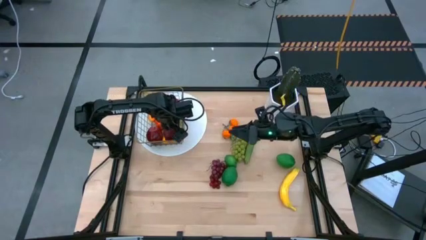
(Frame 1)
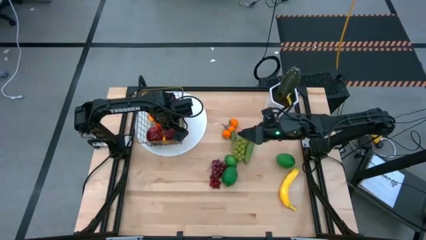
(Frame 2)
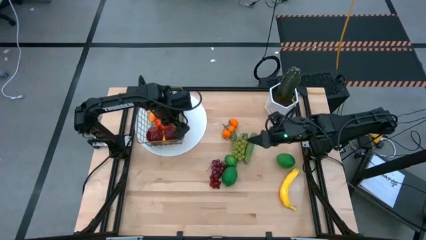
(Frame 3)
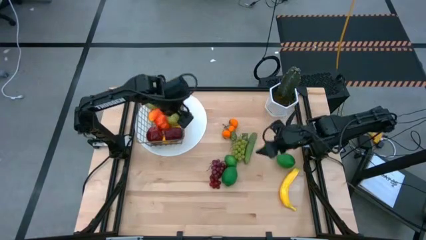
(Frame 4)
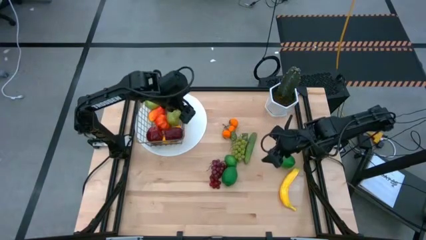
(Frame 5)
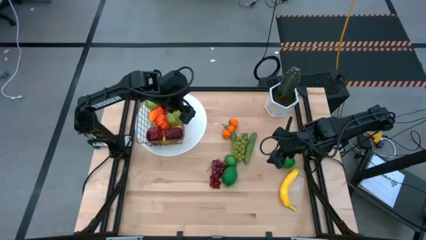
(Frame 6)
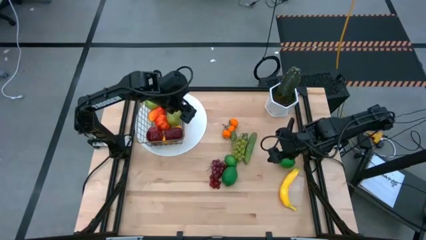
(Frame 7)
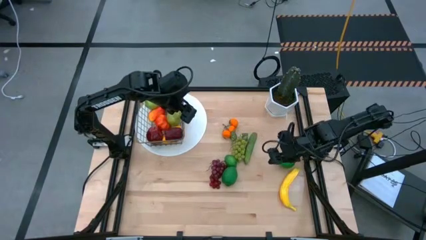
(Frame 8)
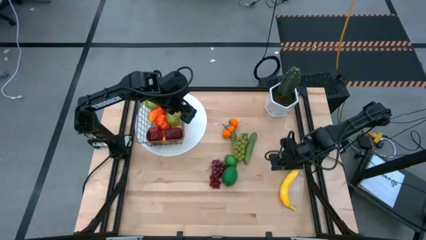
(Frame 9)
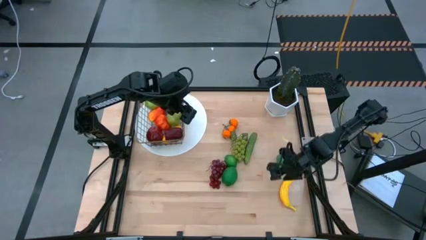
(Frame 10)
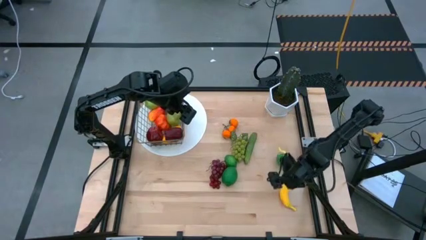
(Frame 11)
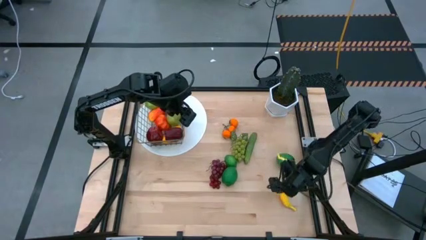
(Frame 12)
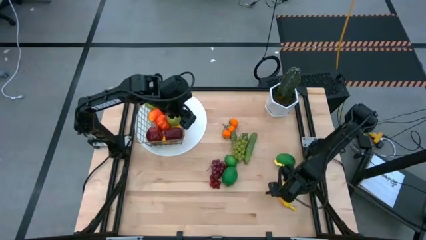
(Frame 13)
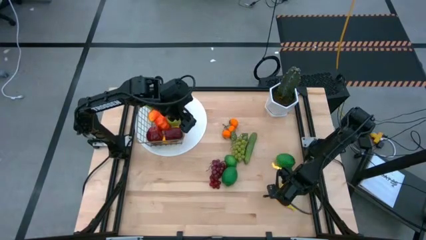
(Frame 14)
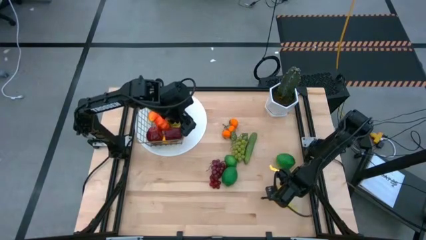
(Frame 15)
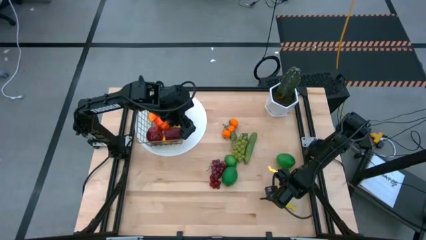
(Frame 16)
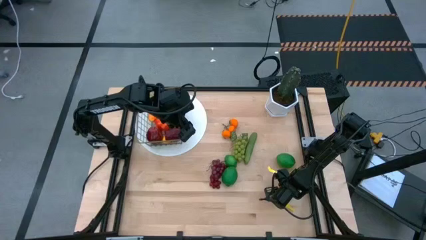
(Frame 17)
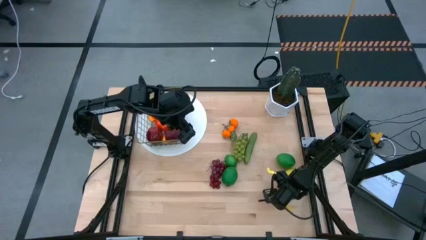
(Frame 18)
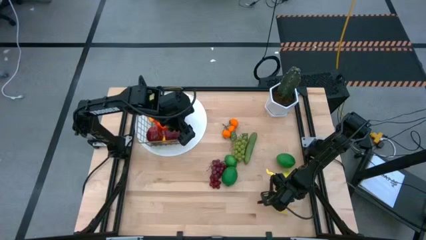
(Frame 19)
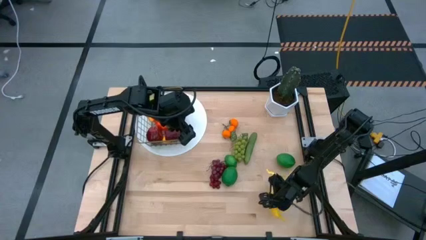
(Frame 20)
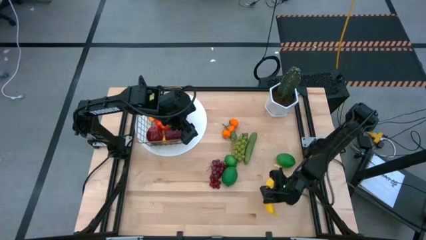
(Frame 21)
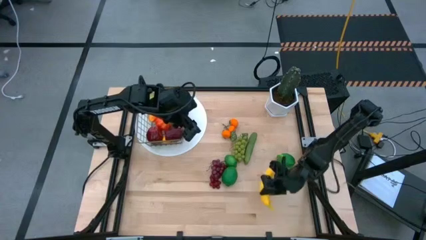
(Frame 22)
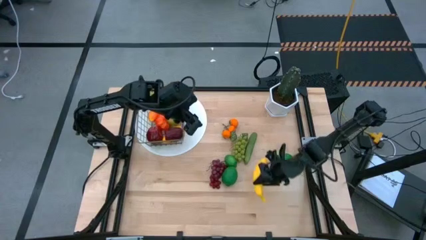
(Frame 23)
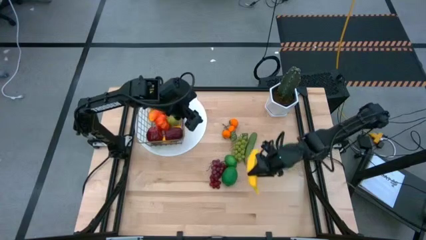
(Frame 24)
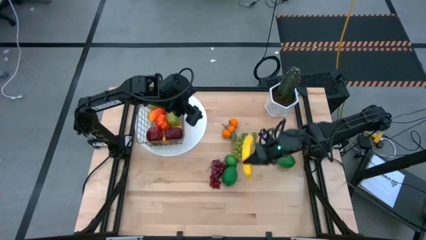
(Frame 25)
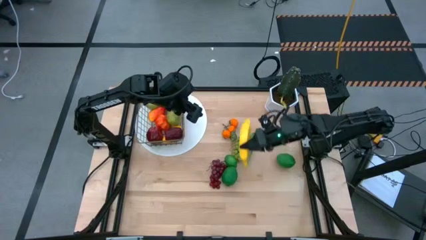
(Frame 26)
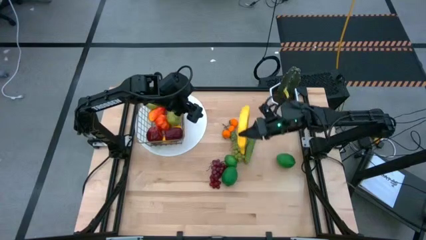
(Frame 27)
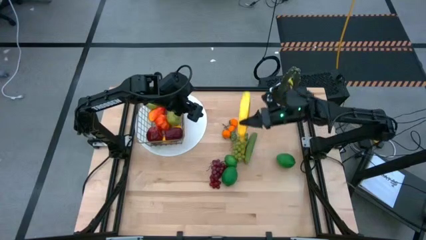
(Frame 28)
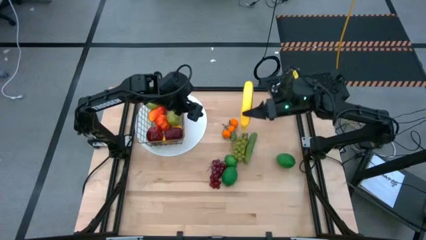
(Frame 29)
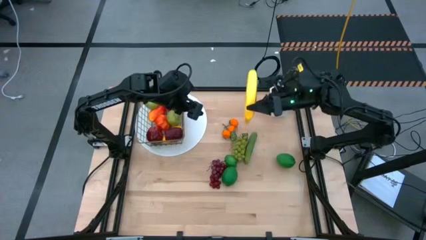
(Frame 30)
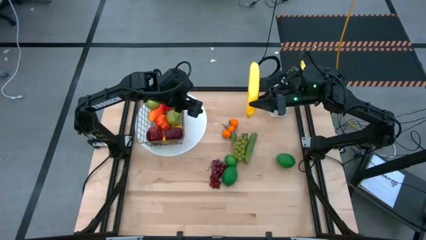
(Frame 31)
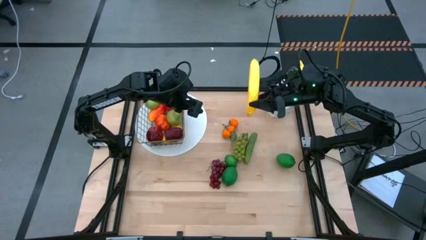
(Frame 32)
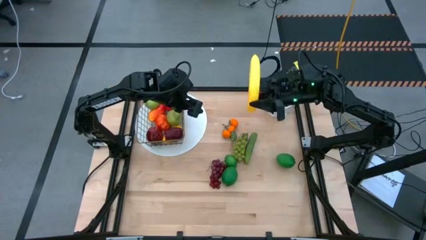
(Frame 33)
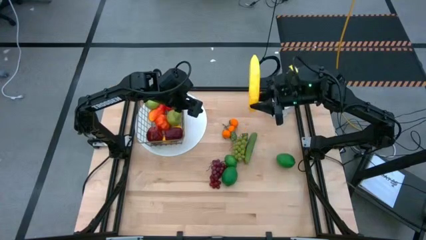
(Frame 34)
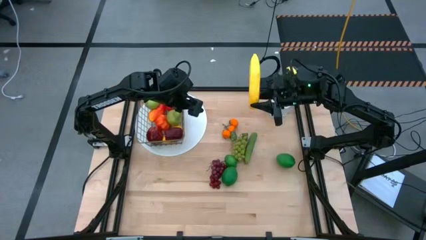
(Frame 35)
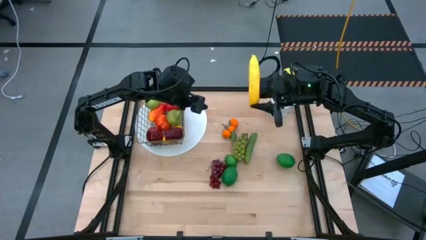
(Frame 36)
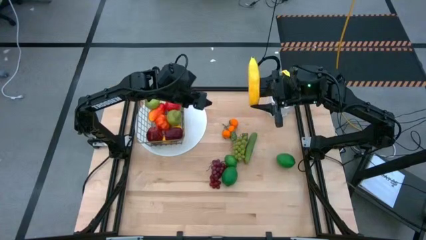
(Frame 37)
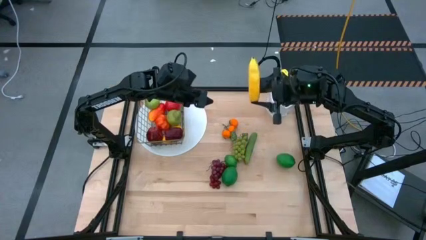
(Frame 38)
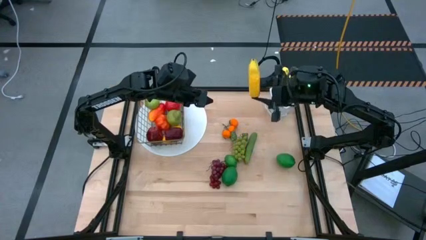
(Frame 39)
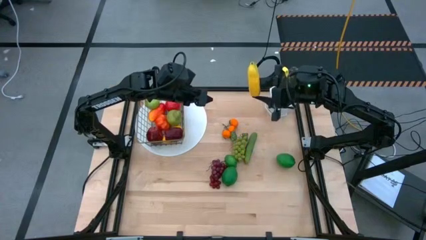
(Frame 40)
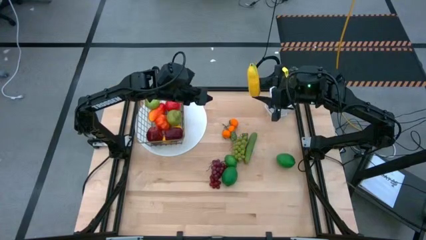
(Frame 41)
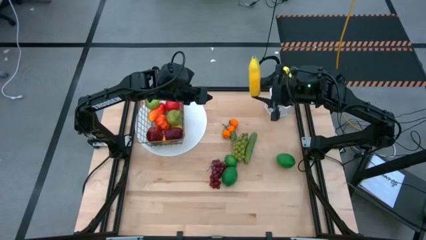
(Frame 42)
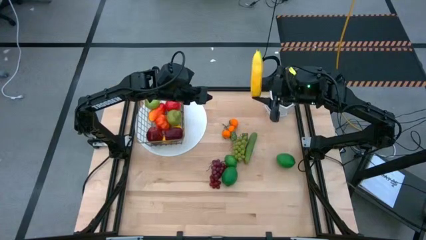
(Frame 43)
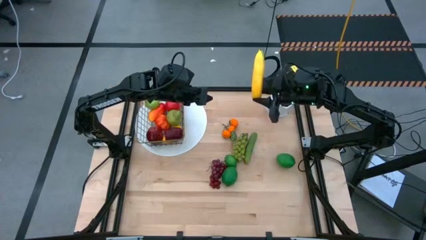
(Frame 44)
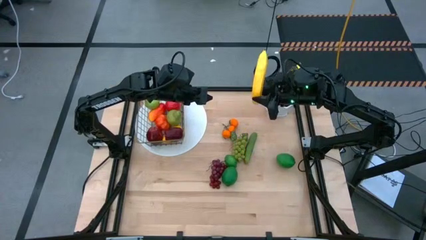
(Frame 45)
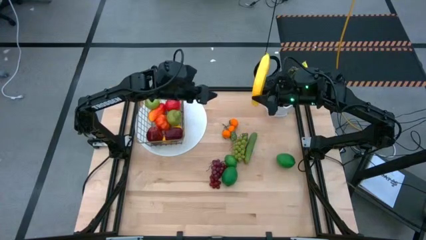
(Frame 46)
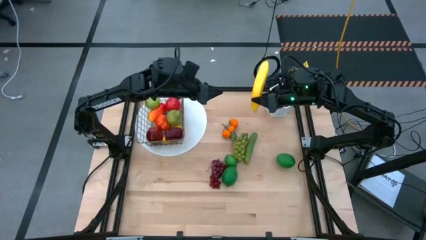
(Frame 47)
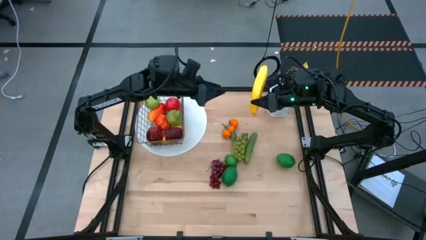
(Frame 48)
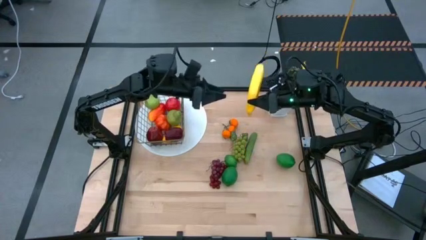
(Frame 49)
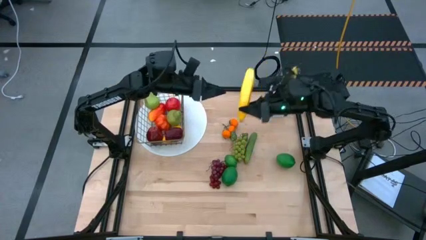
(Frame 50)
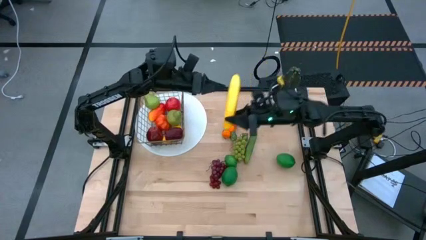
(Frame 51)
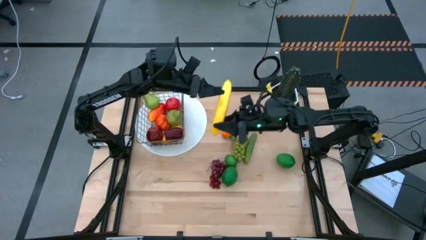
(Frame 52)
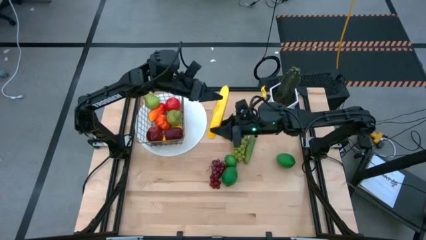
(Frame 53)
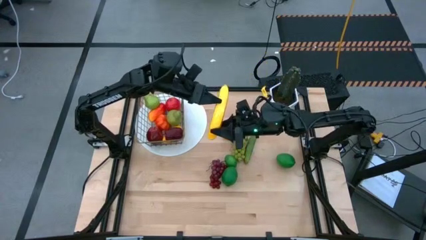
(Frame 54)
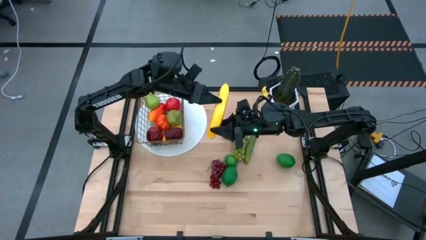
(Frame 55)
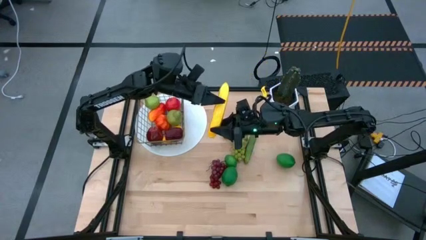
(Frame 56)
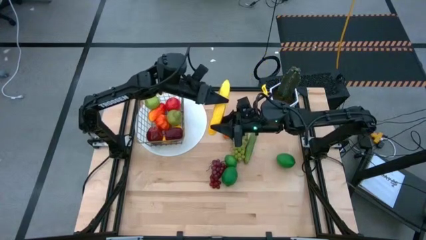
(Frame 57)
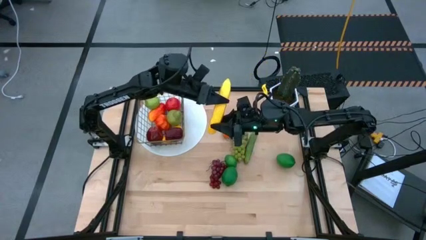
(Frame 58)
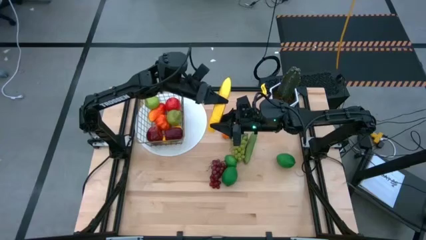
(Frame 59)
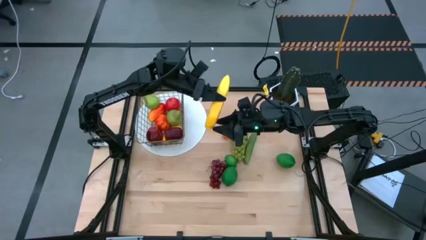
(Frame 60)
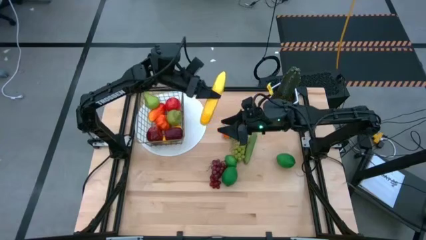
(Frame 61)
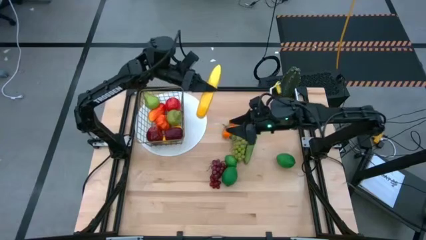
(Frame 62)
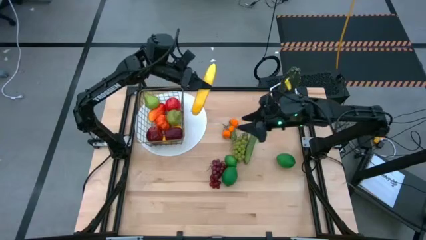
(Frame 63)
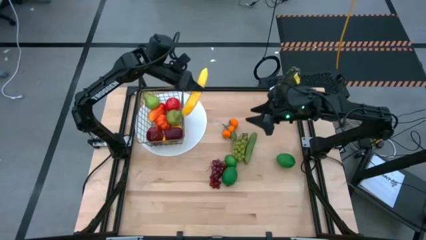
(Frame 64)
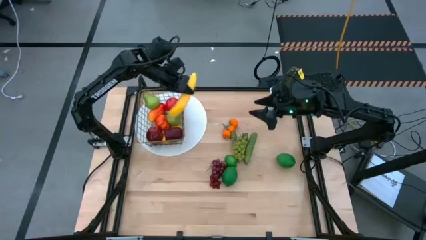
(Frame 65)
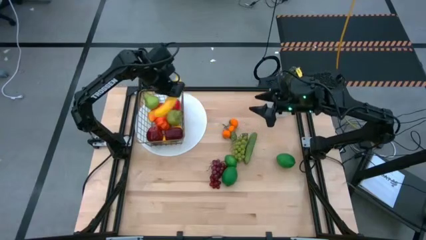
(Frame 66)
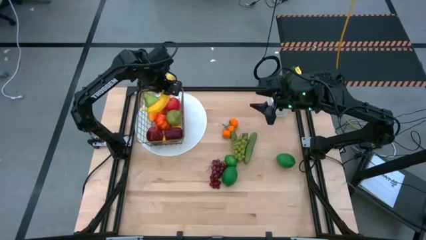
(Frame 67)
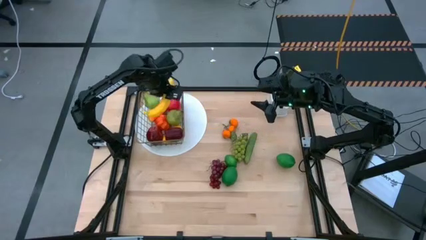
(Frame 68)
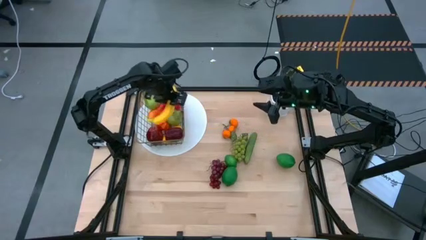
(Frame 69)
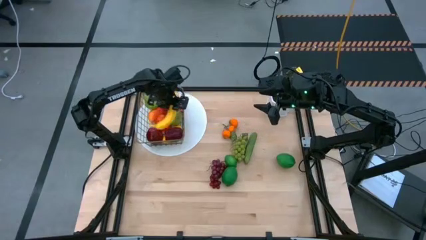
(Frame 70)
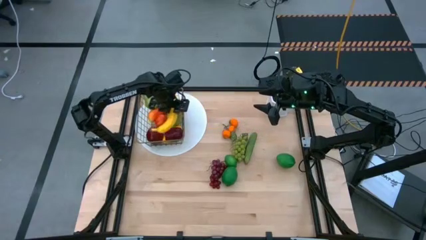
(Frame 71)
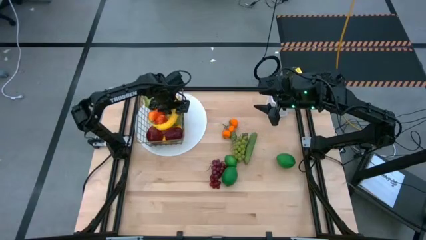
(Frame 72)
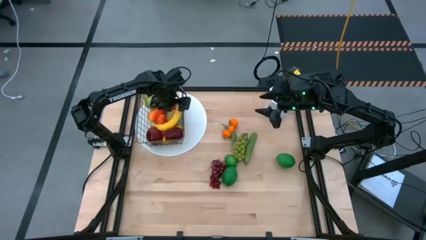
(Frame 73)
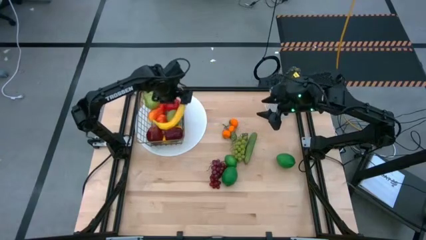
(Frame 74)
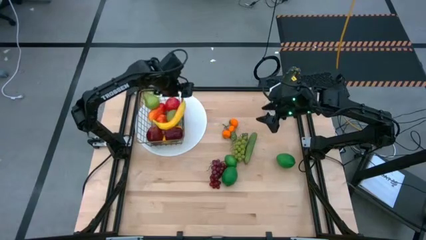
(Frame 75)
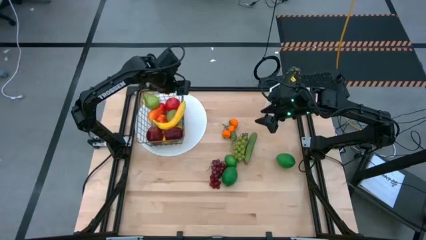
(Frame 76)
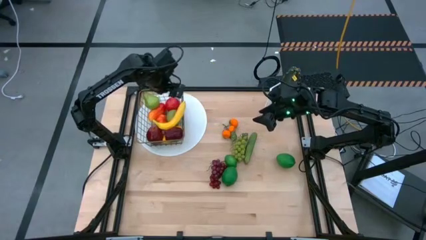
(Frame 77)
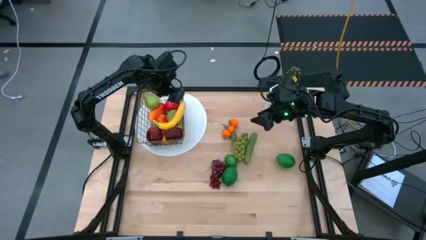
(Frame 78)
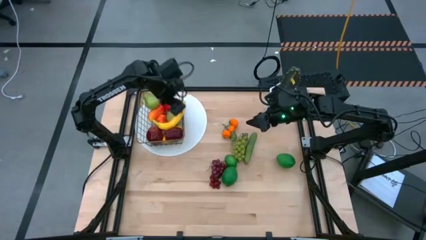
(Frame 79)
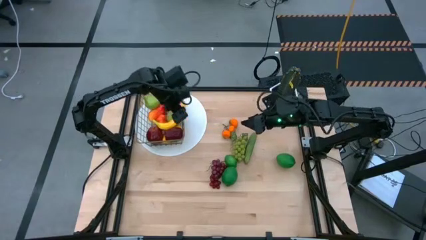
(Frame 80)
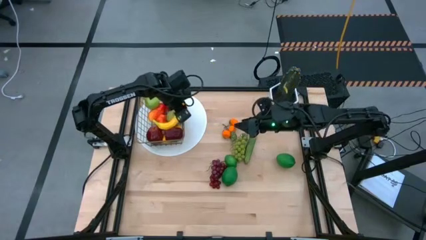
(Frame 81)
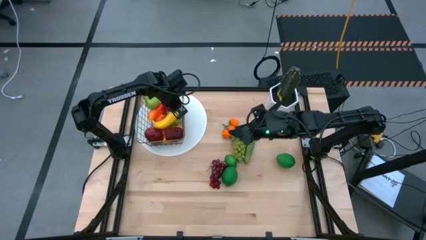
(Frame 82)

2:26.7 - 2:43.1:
Task: Build produce basket
Put the yellow banana into the wire basket
